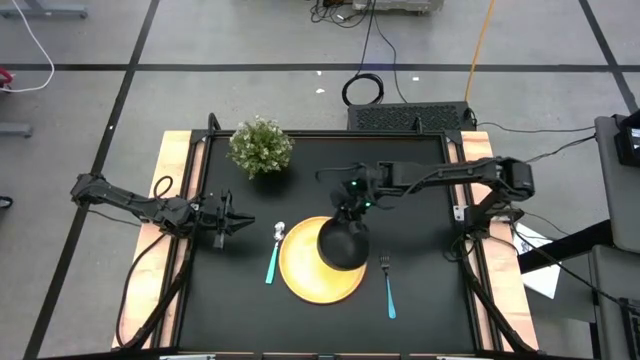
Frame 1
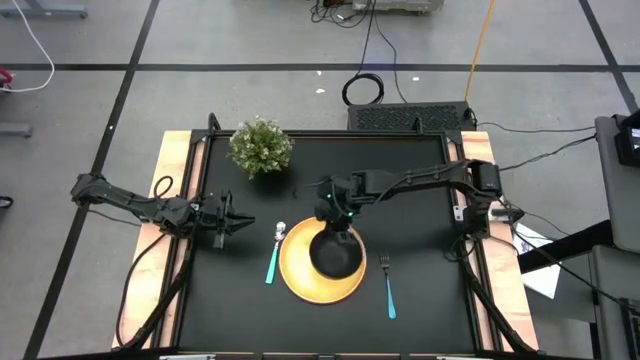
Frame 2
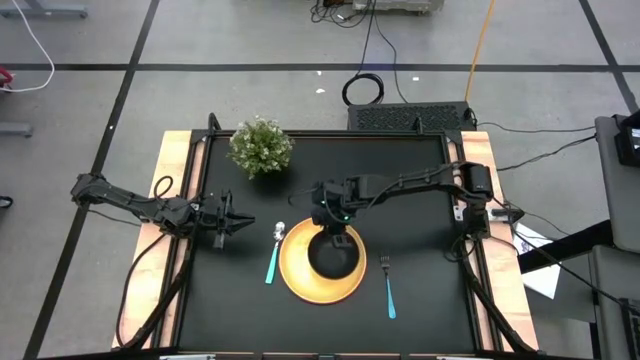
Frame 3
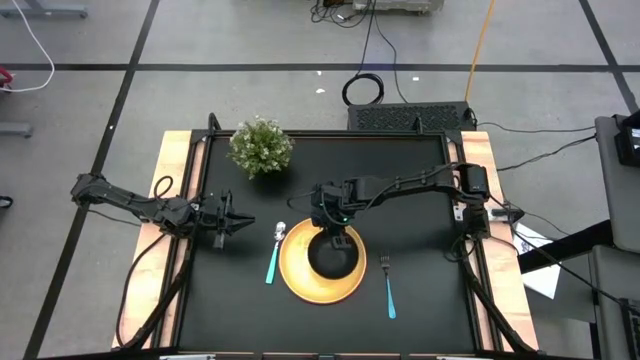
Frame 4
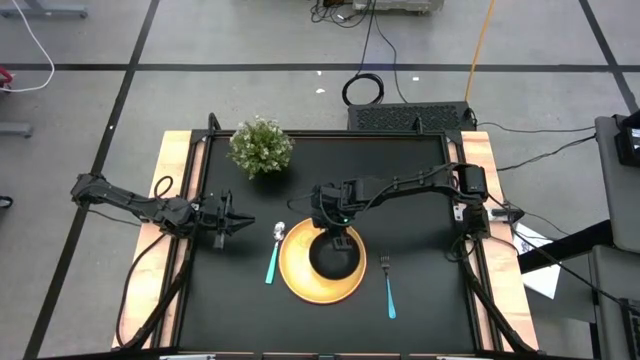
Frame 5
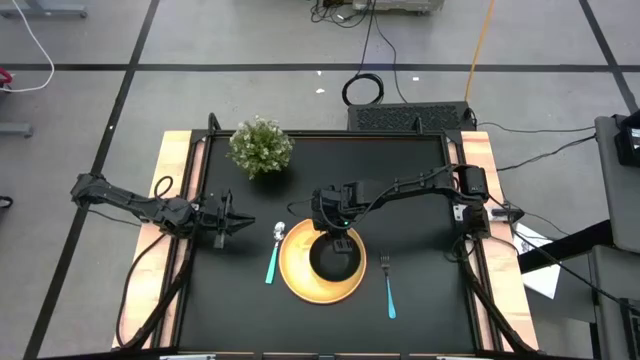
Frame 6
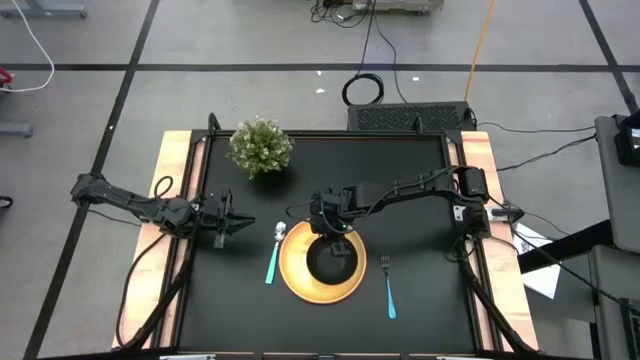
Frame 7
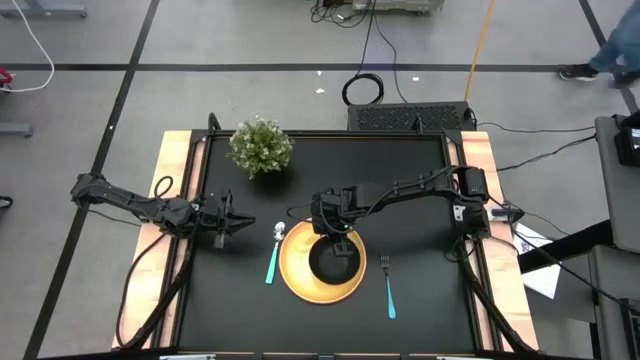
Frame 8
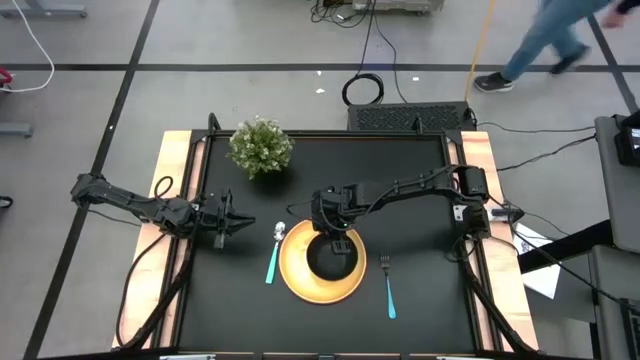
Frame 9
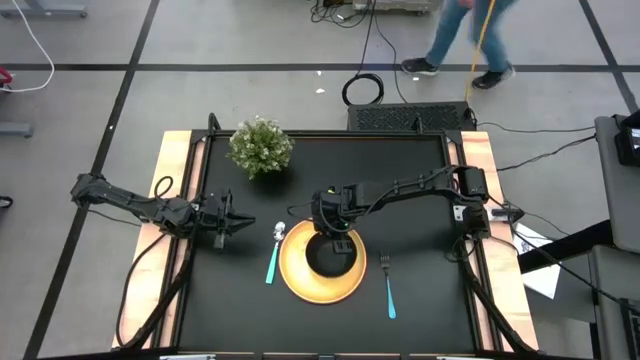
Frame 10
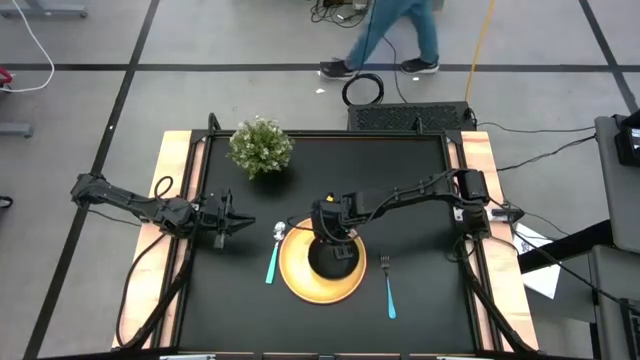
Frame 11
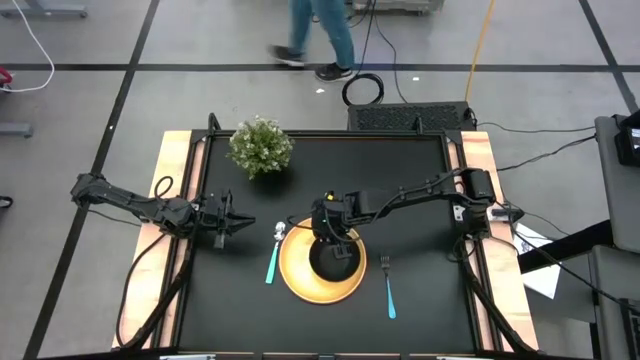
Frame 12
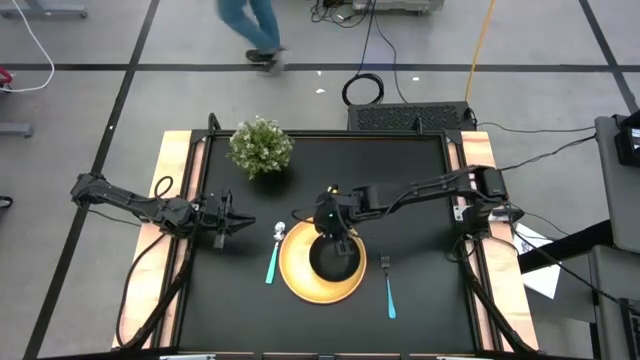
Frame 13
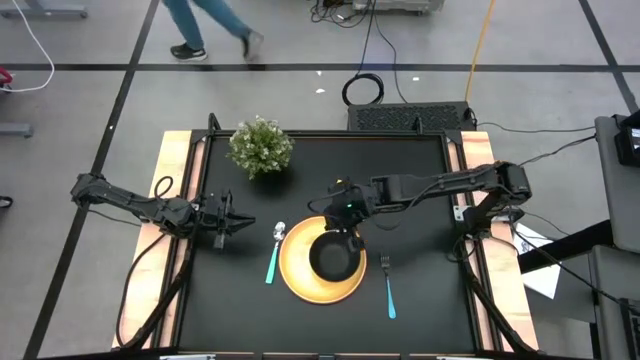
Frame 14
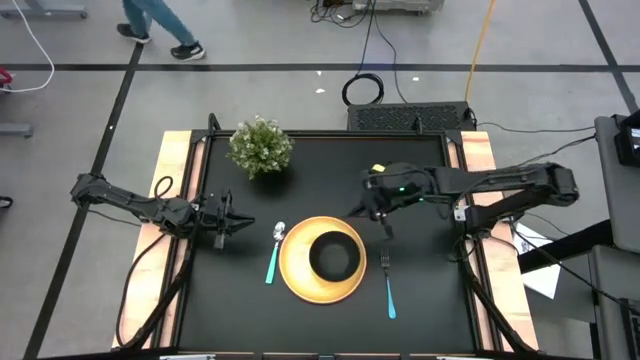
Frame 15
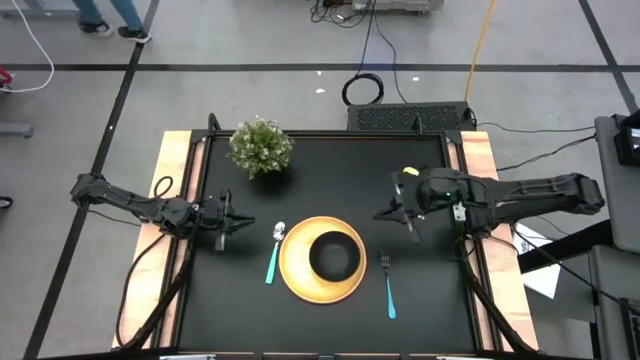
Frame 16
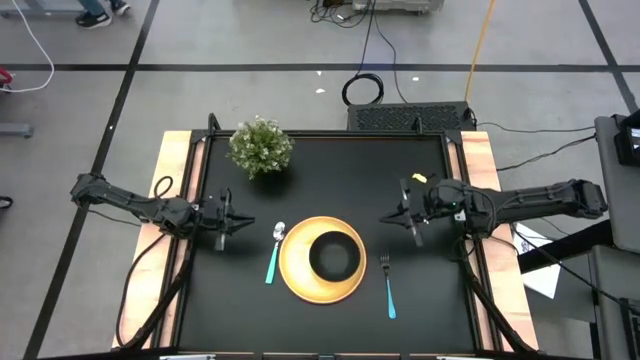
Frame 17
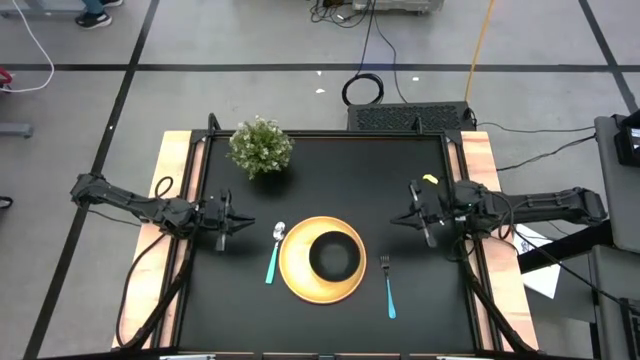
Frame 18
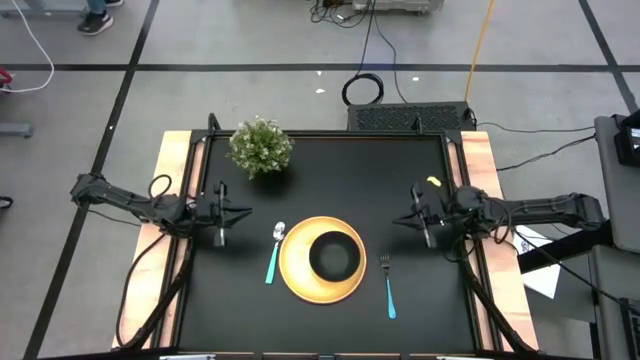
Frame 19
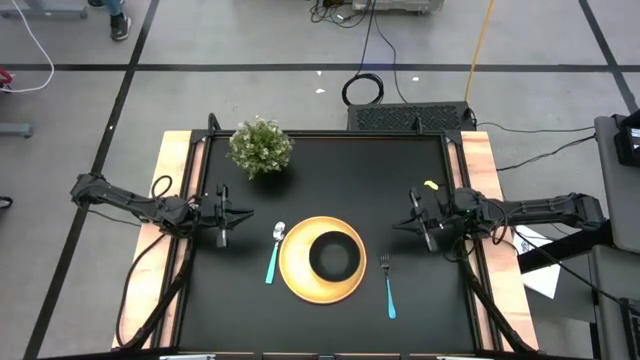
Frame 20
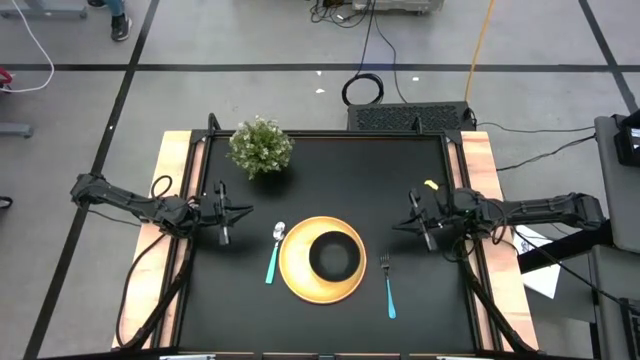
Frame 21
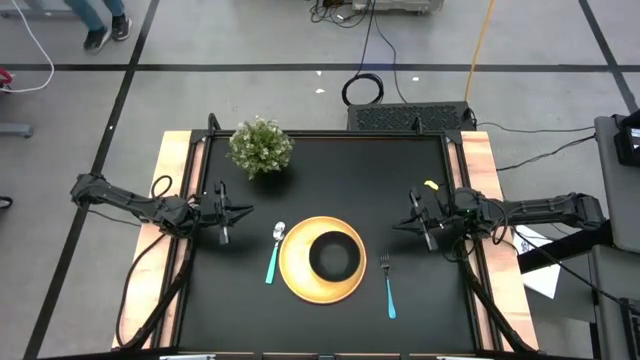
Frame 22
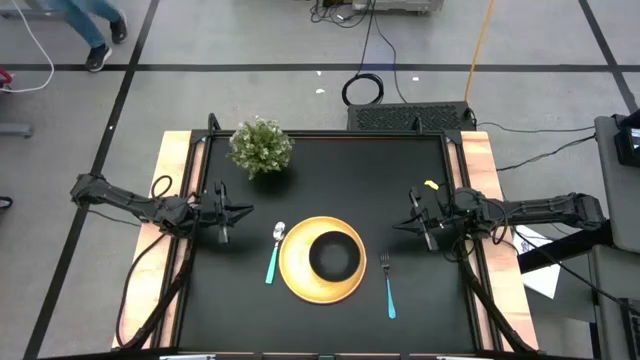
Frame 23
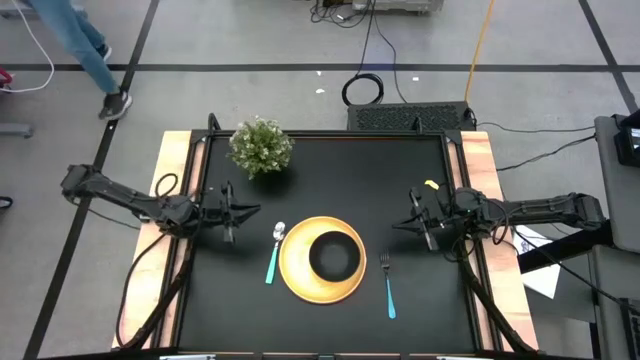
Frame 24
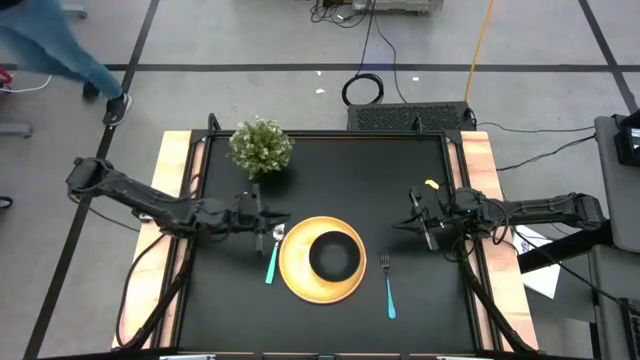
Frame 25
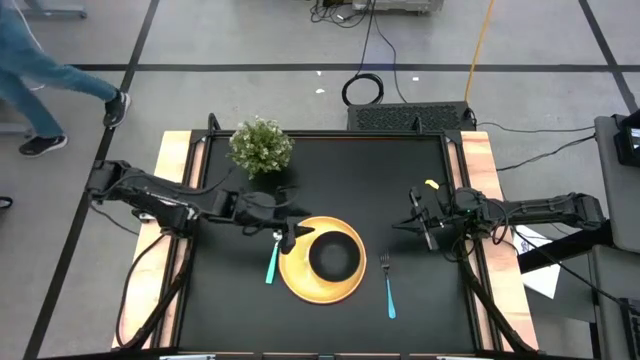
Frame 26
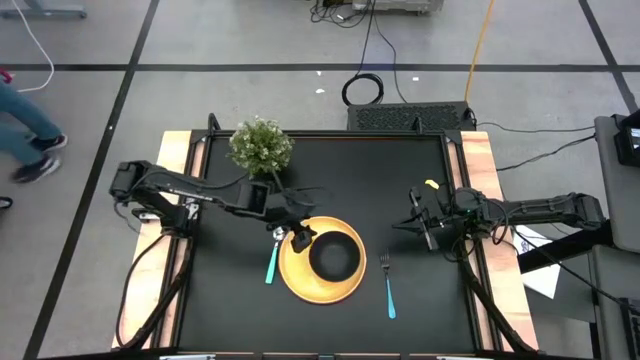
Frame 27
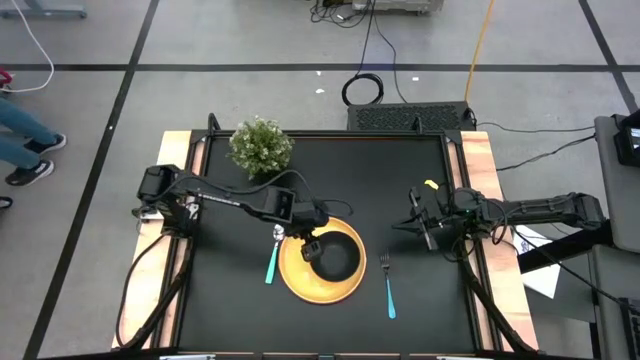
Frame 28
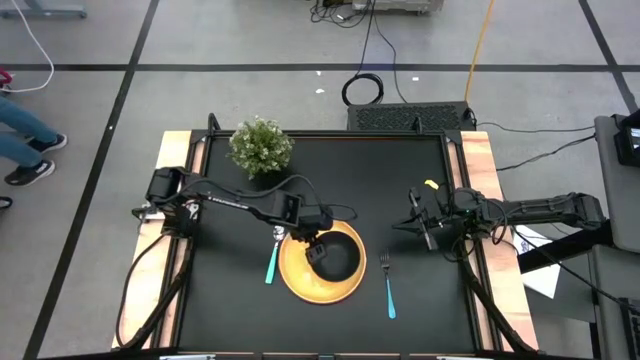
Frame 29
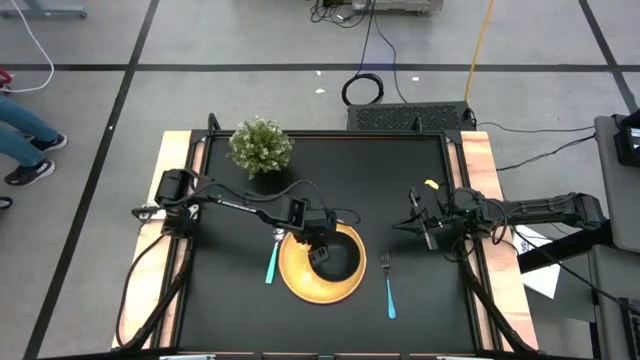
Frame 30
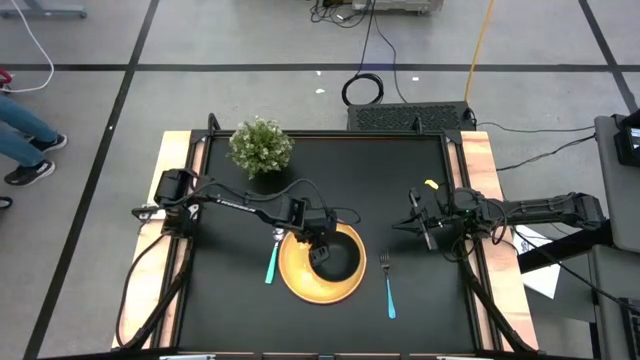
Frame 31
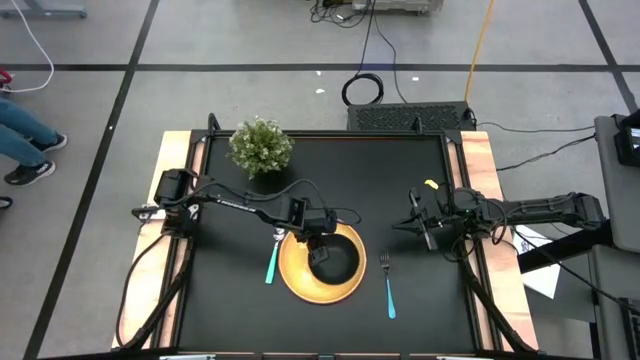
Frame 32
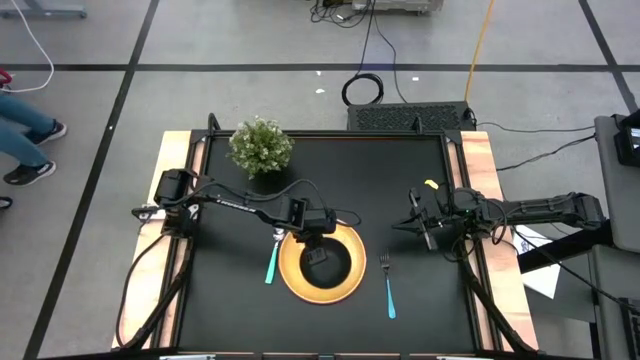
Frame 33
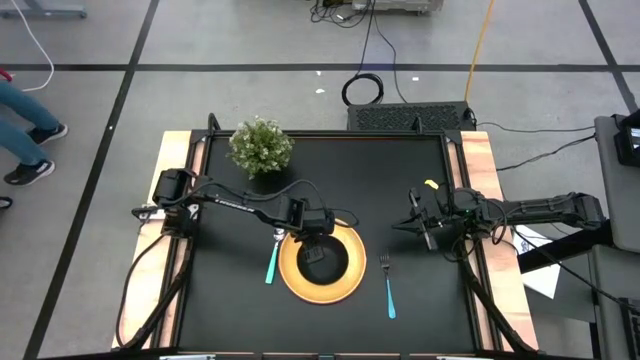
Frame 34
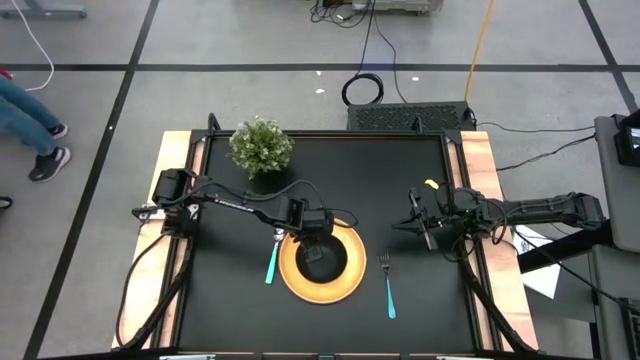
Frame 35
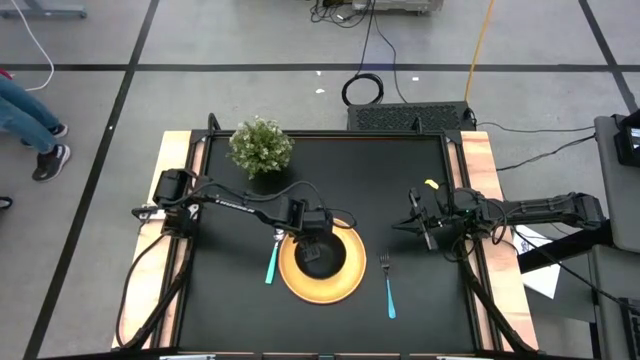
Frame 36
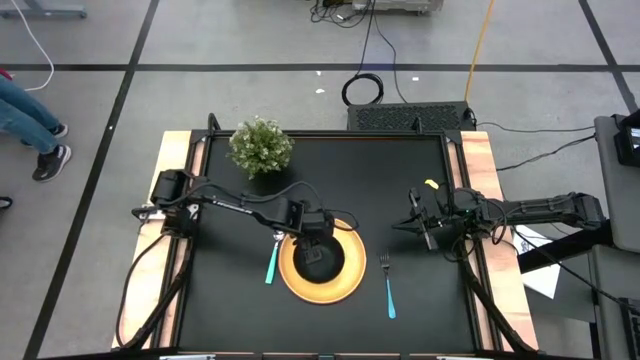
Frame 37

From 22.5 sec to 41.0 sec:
Task: Set table place
Put the black bowl on the yellow plate
